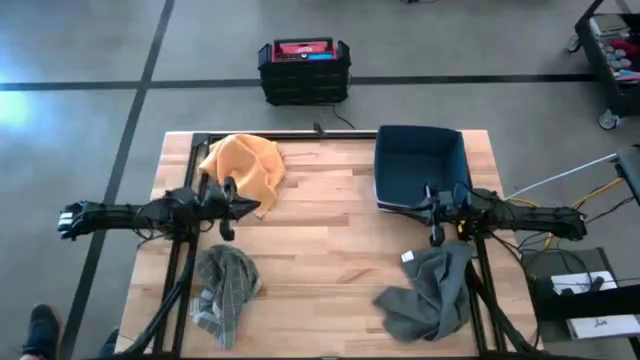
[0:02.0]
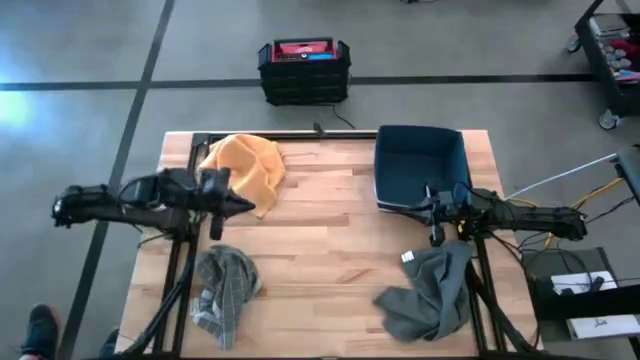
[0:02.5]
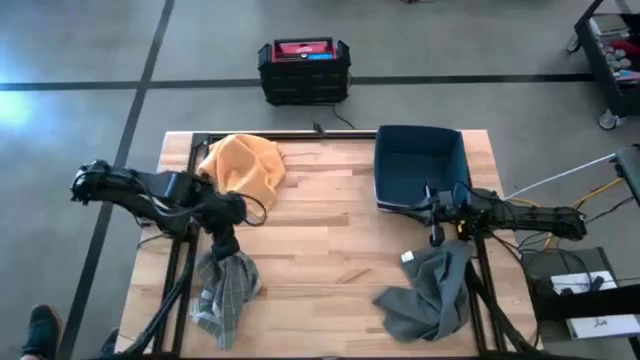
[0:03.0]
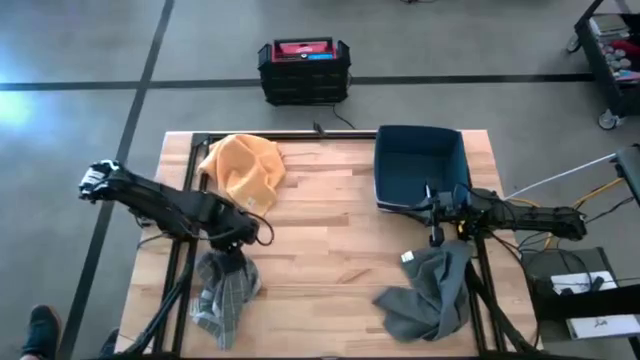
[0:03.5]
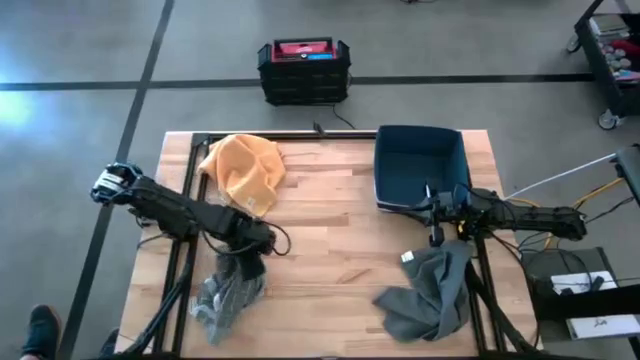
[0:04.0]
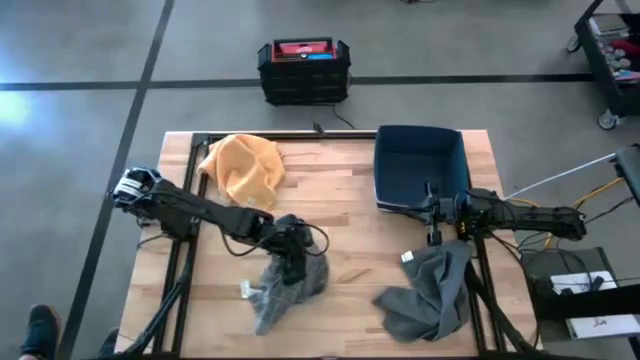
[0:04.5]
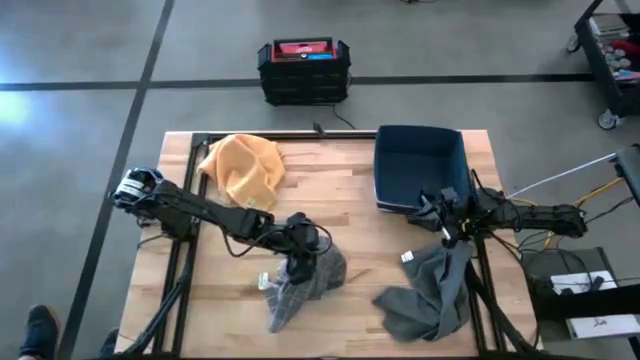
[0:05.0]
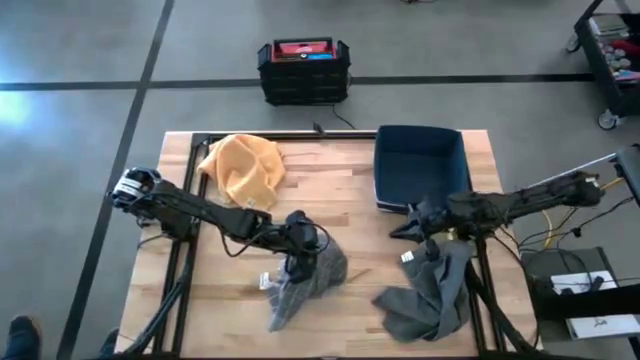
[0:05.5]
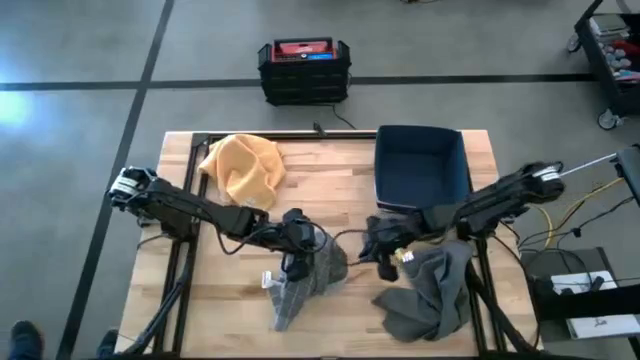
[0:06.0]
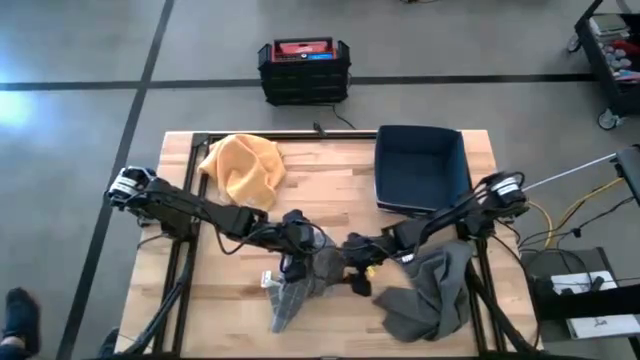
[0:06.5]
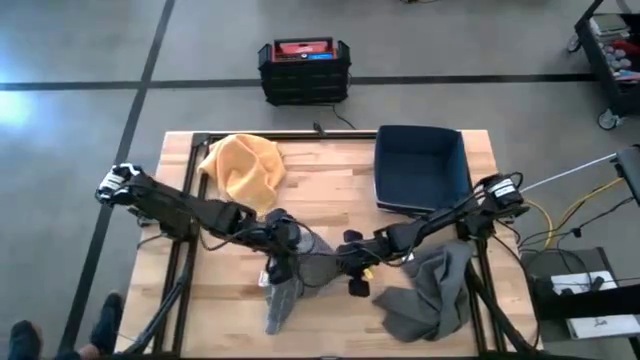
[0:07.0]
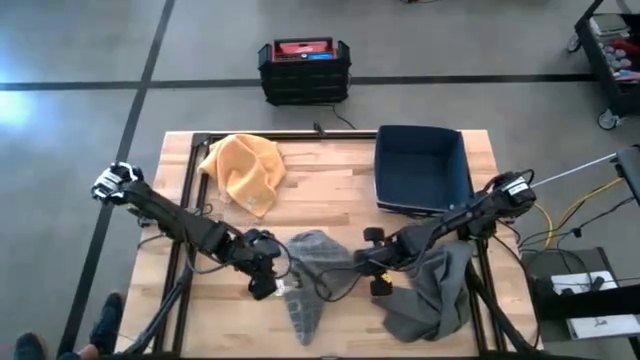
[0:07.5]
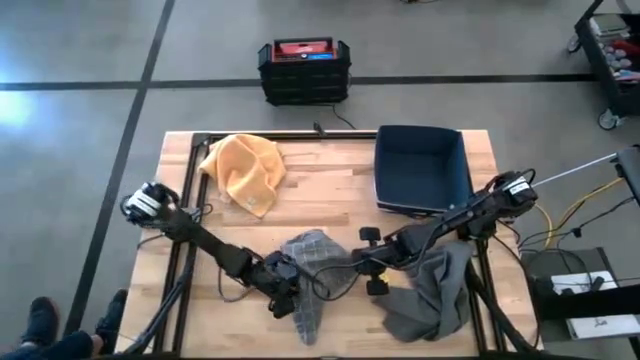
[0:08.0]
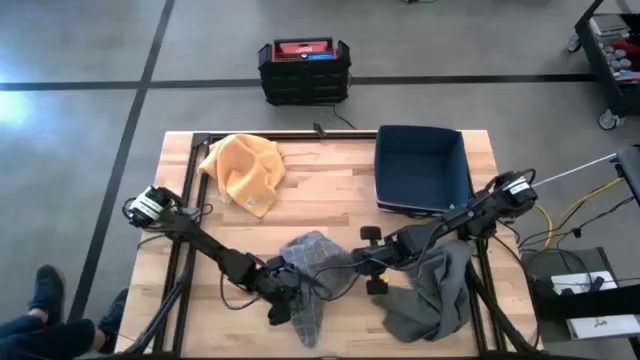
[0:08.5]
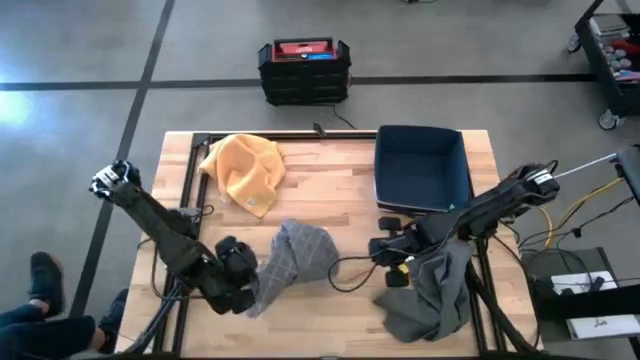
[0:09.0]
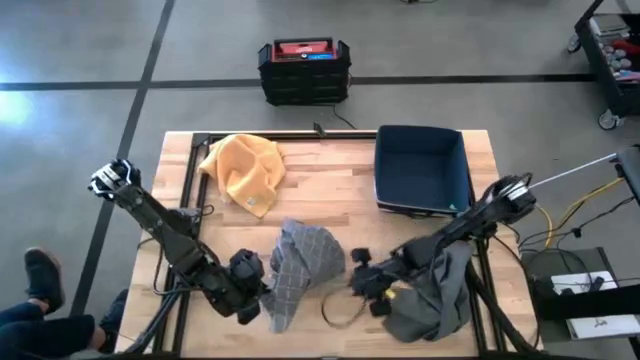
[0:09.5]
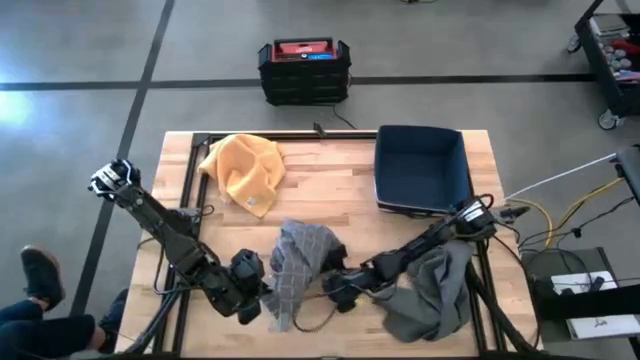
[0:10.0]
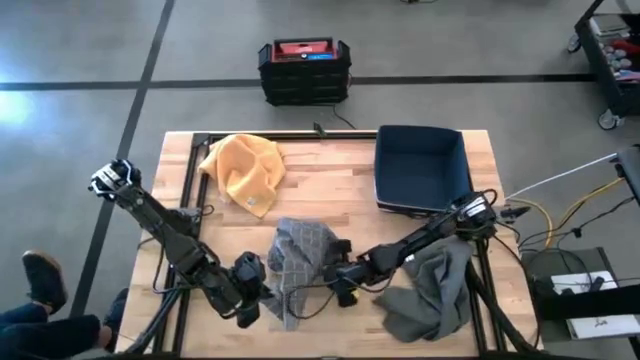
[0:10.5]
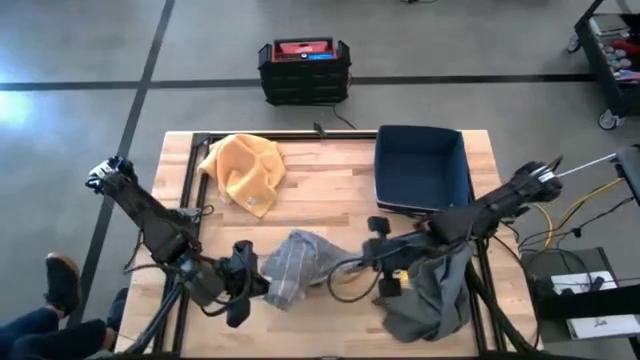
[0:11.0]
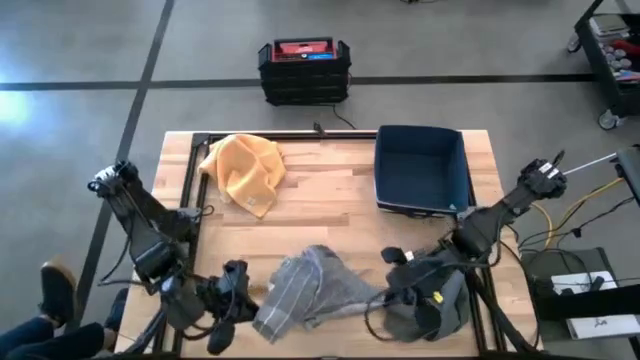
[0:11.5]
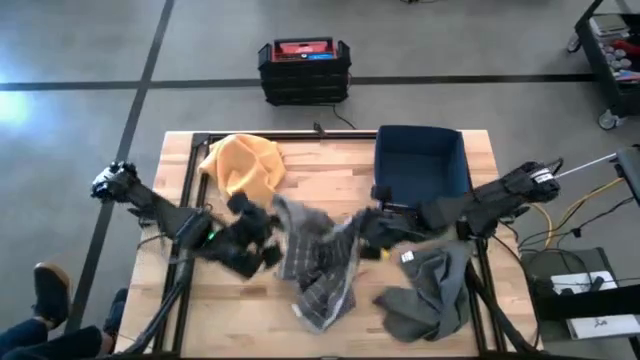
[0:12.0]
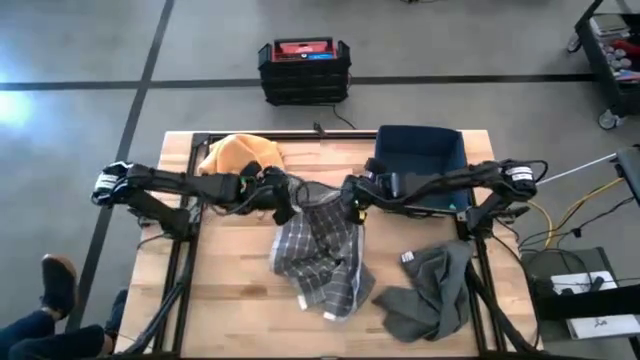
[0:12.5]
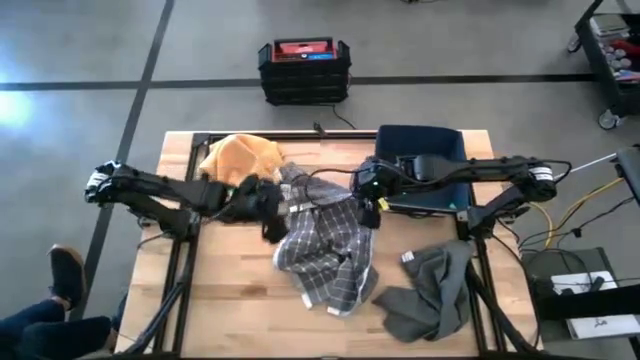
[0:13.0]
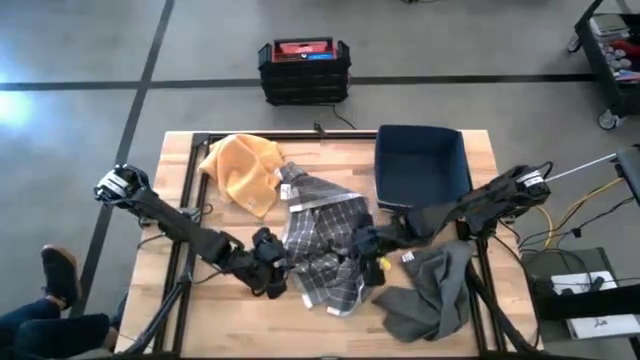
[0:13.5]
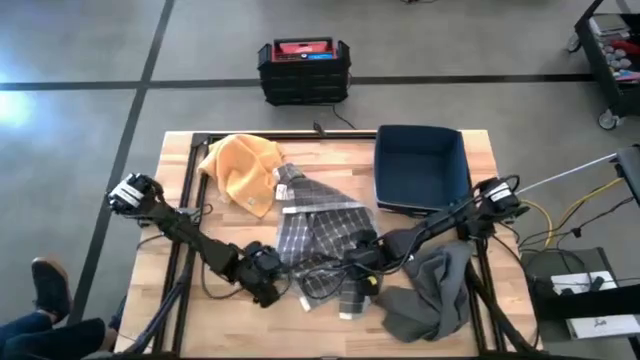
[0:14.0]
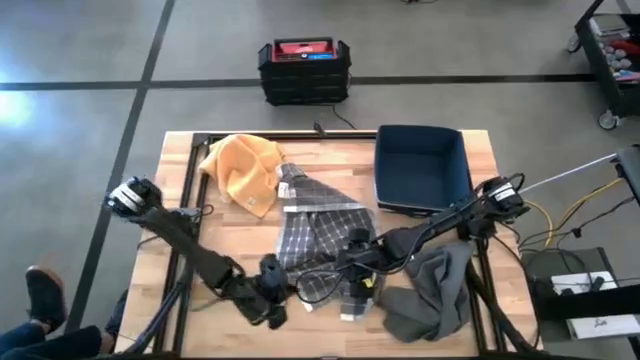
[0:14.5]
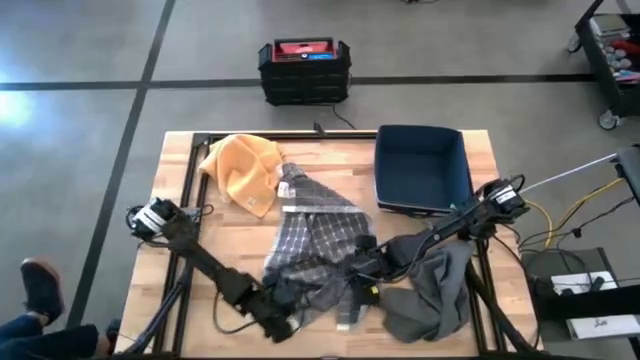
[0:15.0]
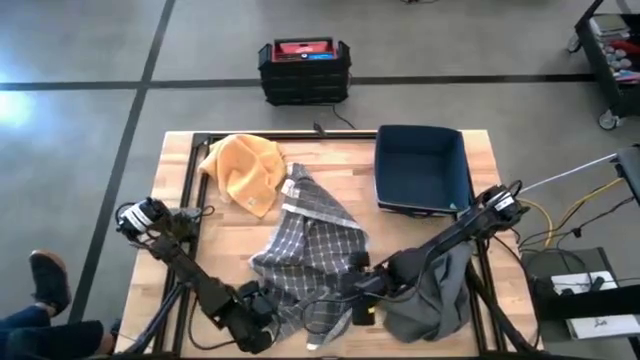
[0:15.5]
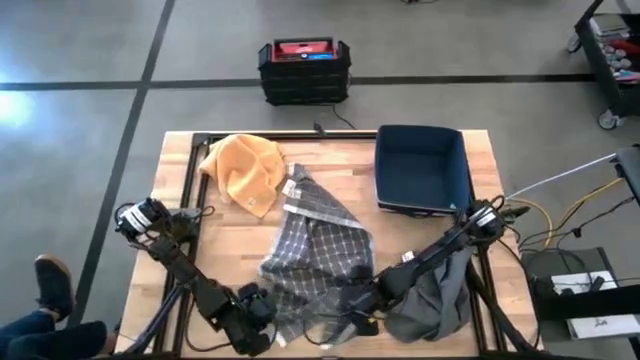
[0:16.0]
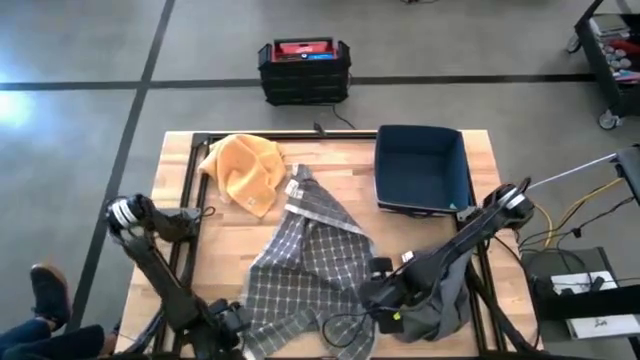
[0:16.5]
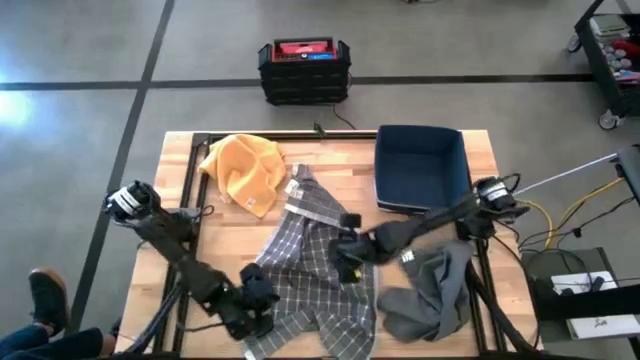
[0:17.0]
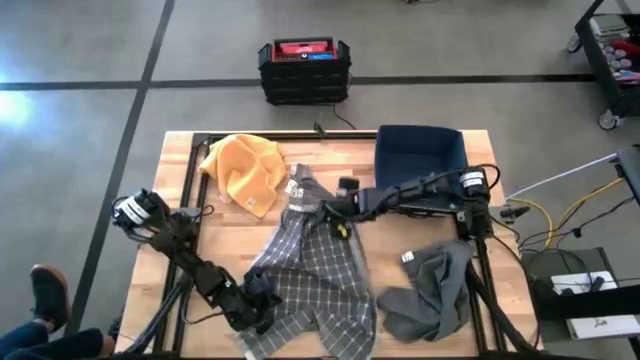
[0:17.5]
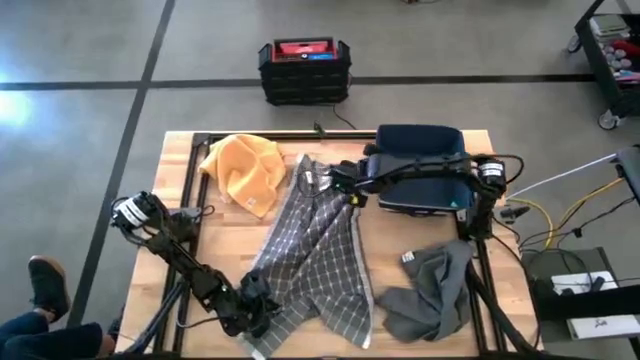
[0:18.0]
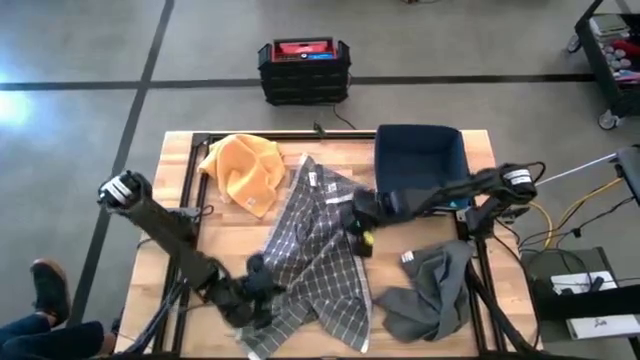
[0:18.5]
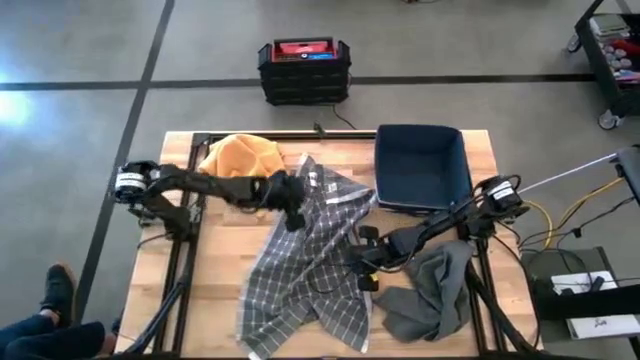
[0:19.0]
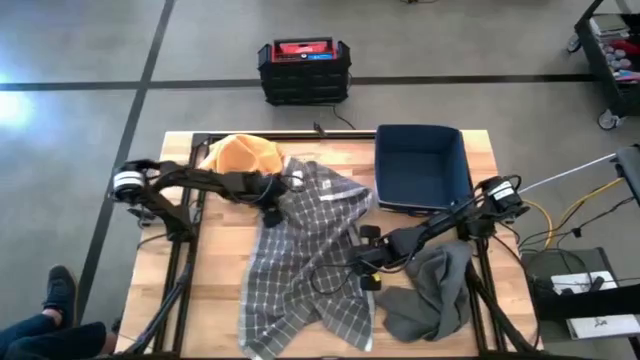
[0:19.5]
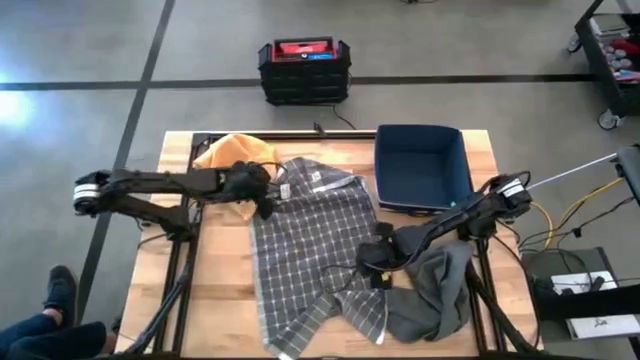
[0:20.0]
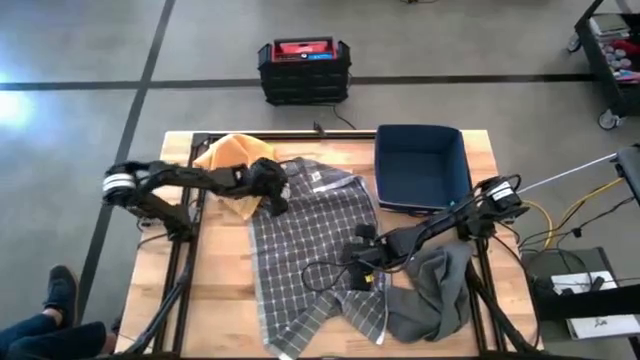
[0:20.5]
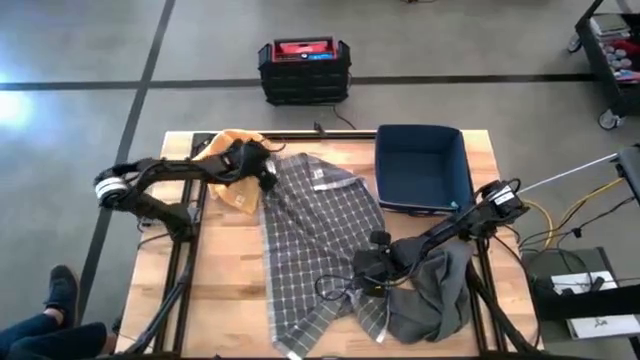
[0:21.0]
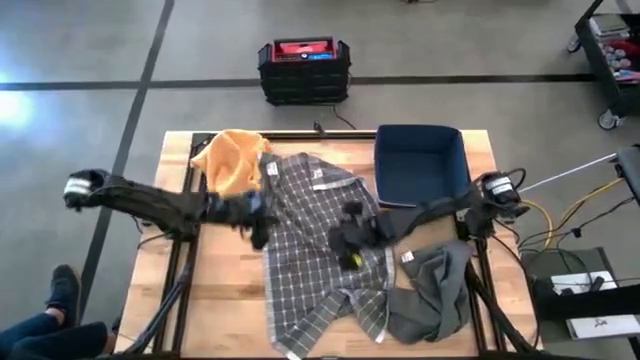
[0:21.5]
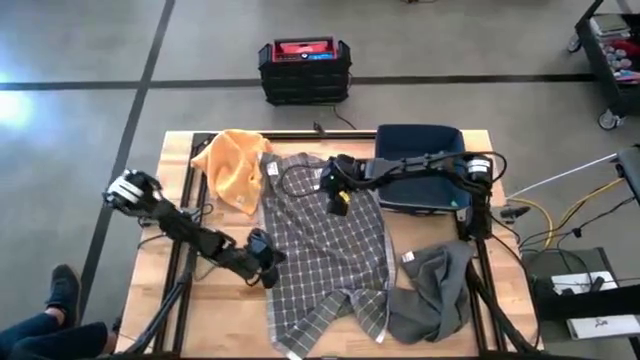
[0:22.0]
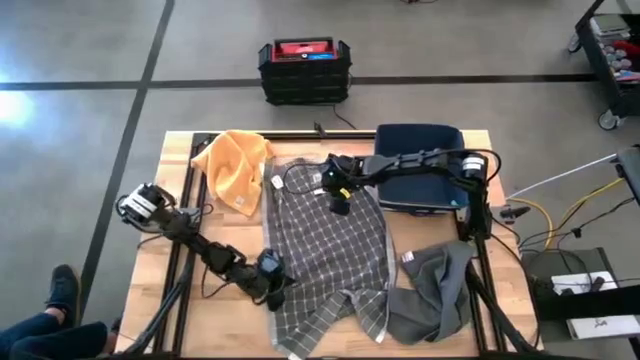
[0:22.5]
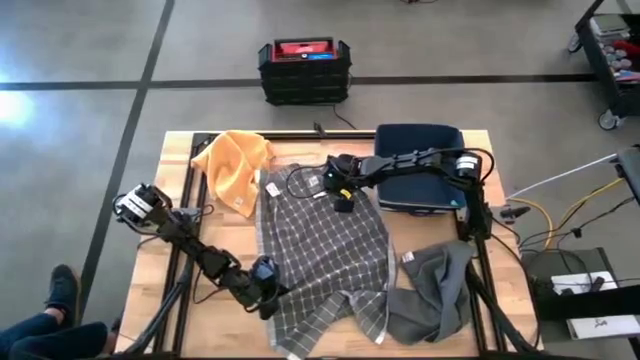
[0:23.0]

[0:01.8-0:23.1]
Task: Fold towel
Fold the gray patterned kitchen towel

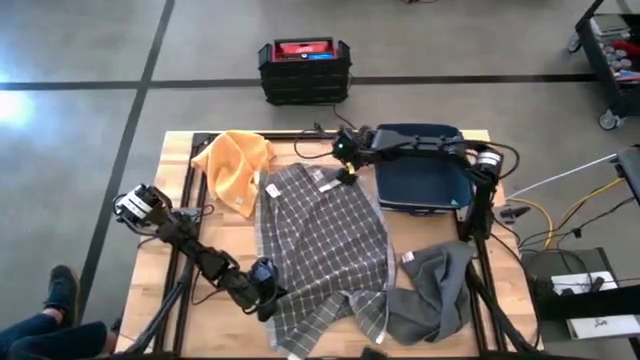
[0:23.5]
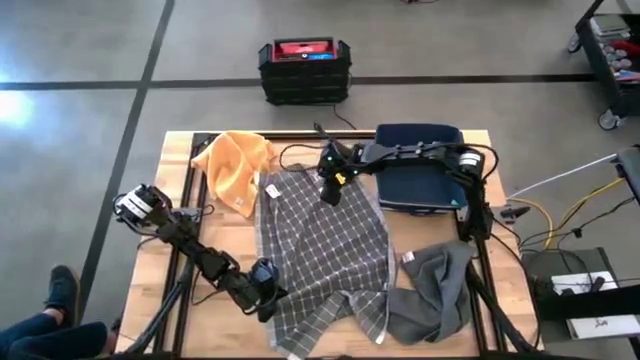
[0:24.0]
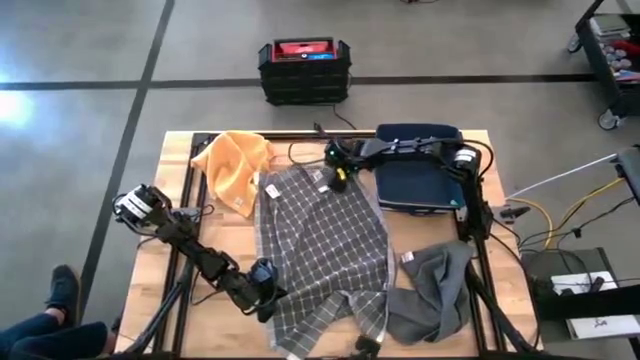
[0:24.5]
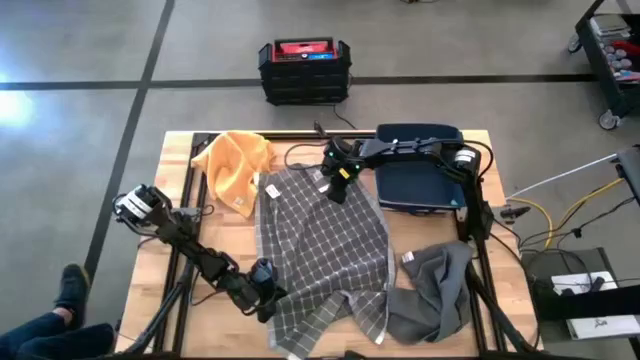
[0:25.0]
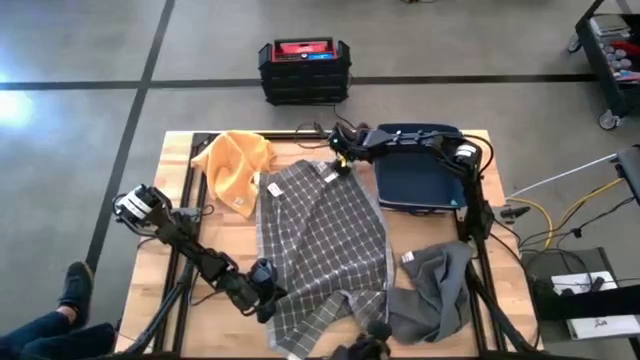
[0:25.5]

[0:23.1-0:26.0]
Fold the gray patterned kitchen towel
